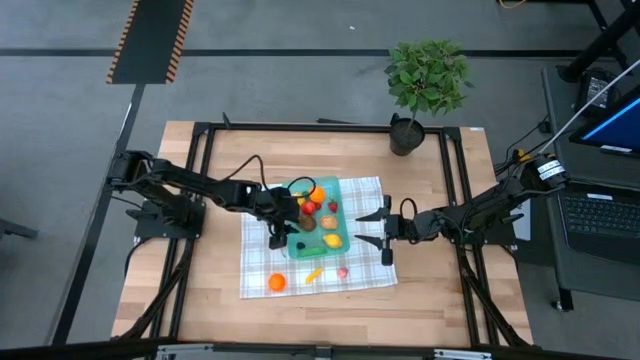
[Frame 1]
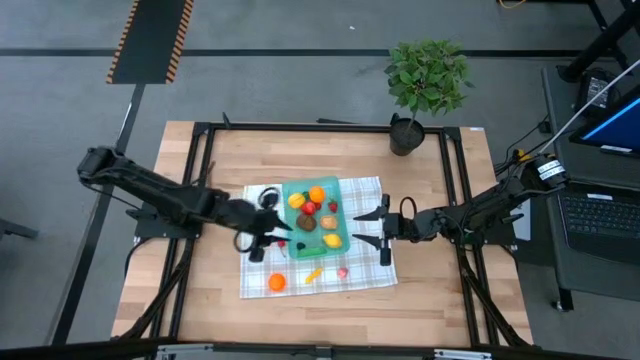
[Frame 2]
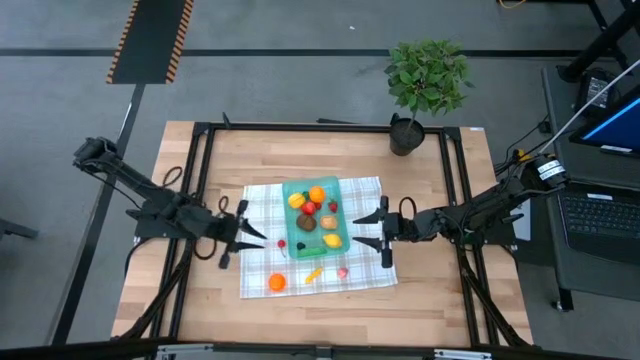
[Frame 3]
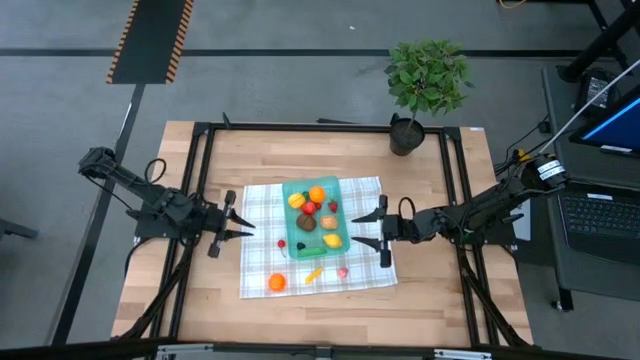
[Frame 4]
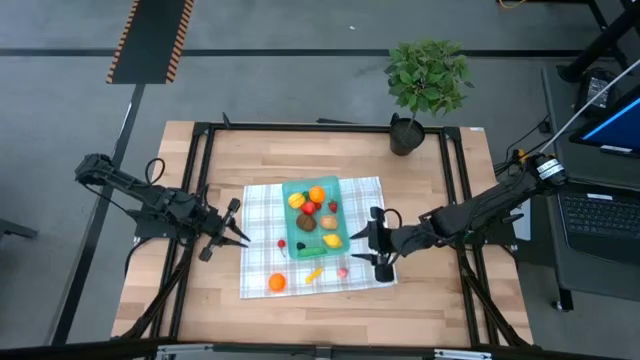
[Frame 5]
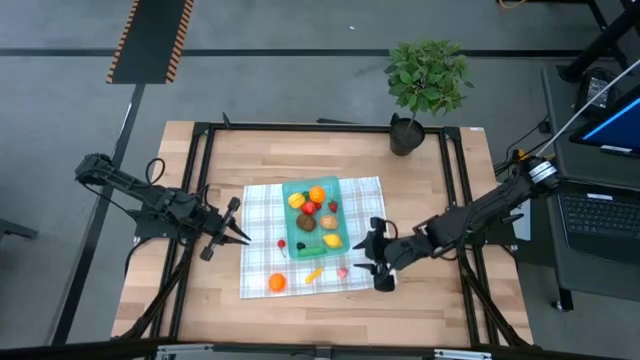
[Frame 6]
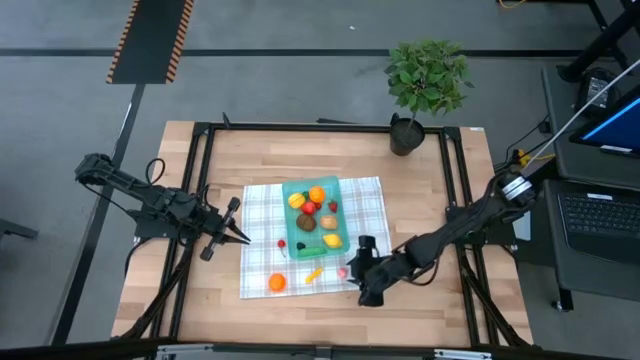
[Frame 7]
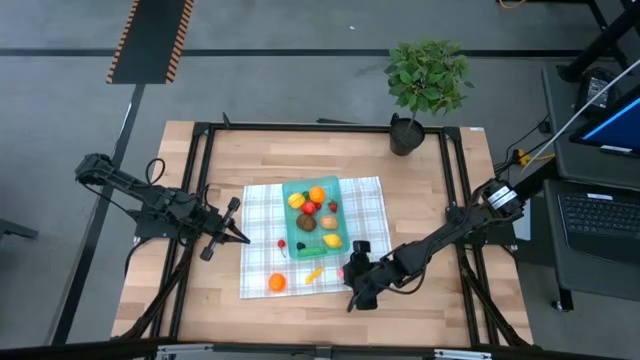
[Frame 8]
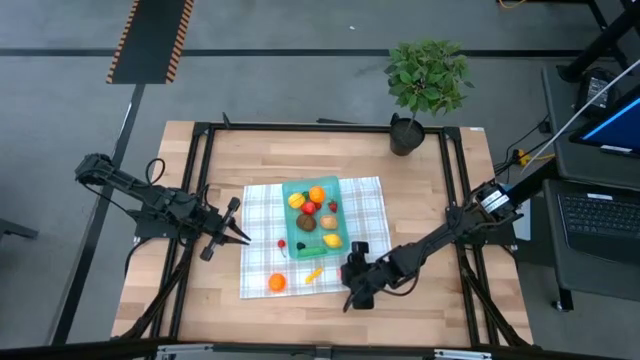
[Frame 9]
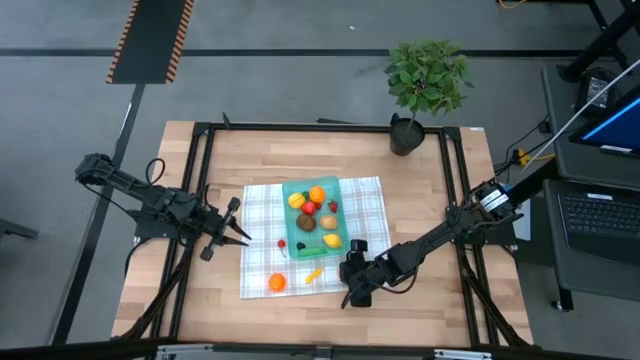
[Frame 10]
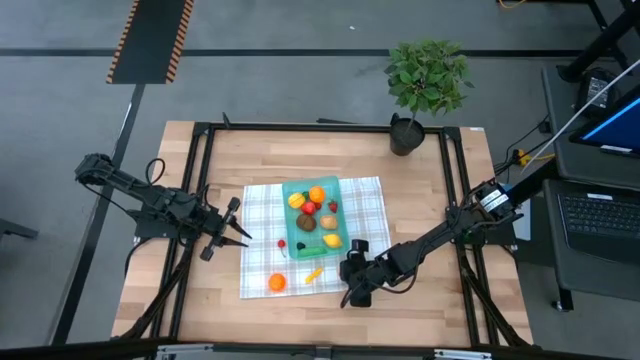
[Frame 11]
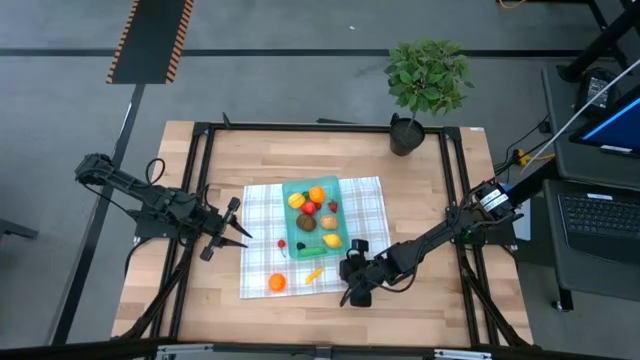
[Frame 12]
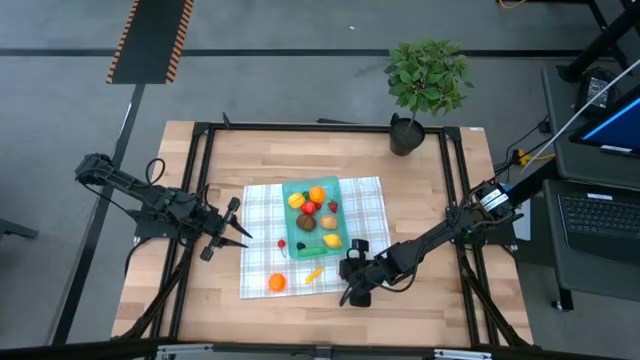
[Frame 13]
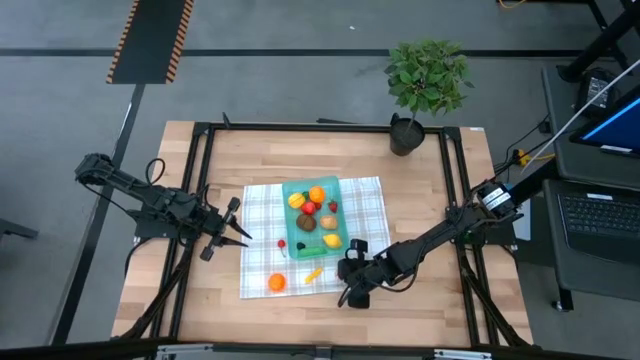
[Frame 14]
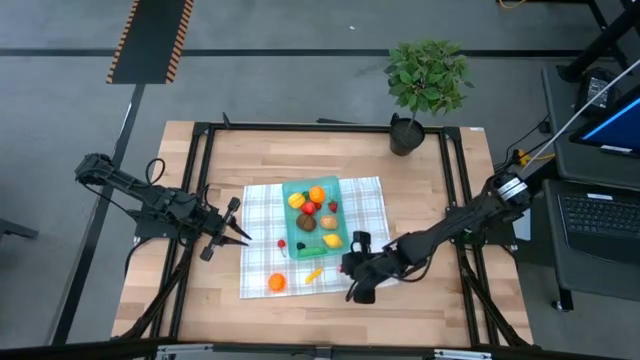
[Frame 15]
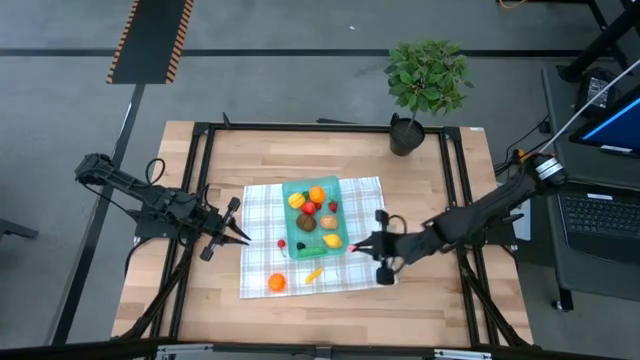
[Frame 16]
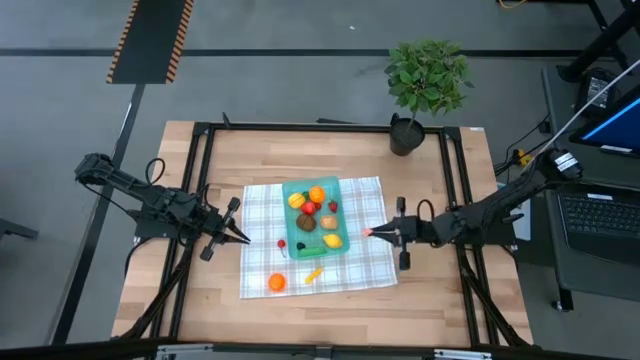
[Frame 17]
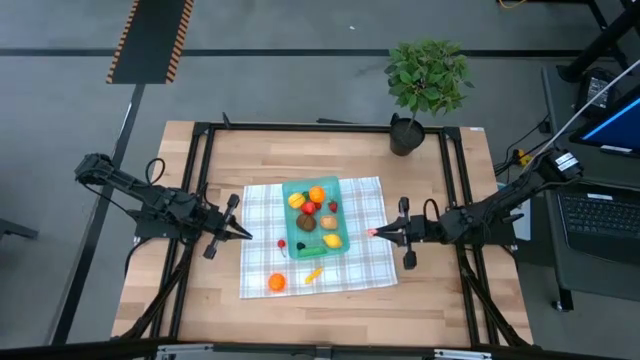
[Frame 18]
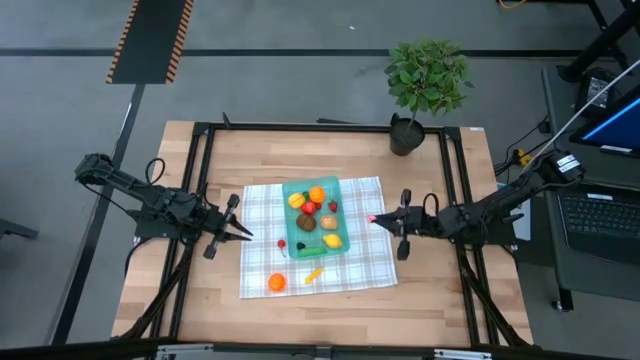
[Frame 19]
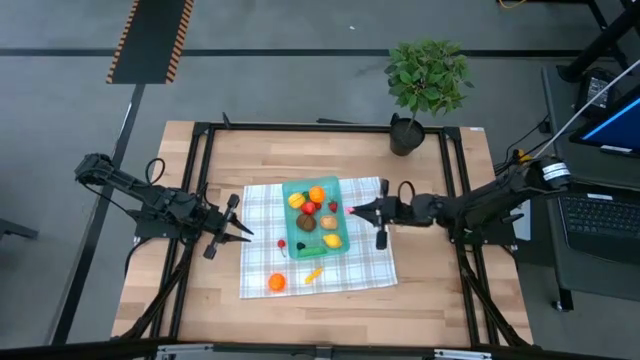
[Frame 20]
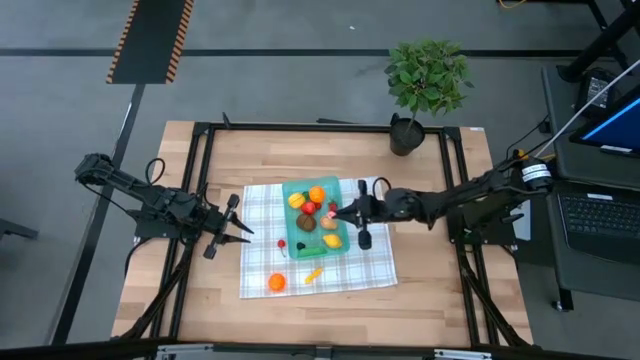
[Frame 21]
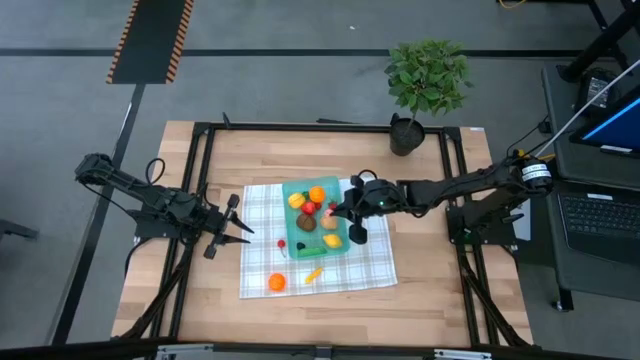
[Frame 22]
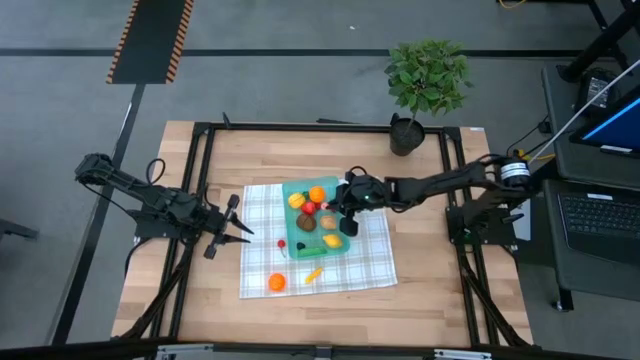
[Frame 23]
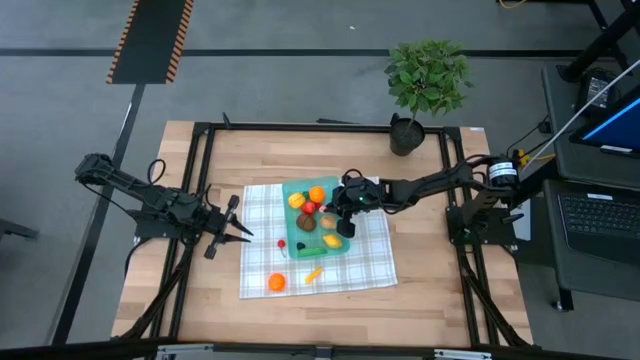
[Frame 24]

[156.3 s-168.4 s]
Task: Pick and placing Produce into tupperware
Put the peach into the blue bin

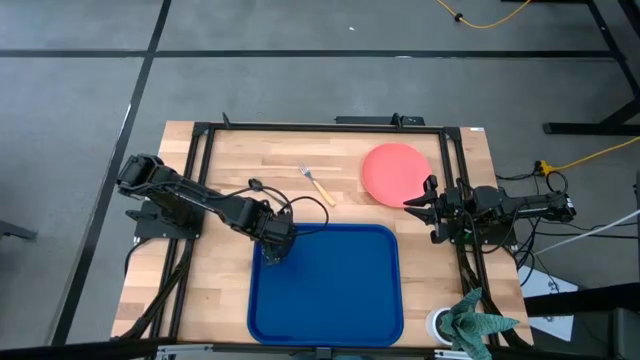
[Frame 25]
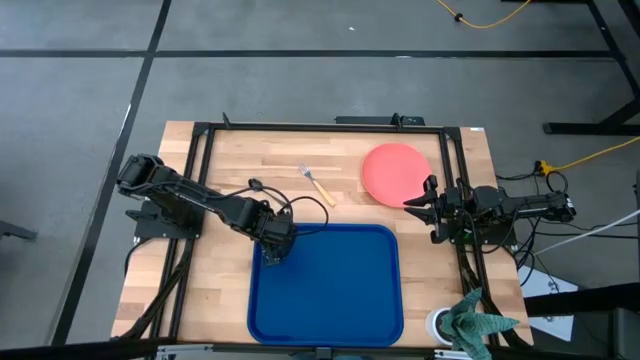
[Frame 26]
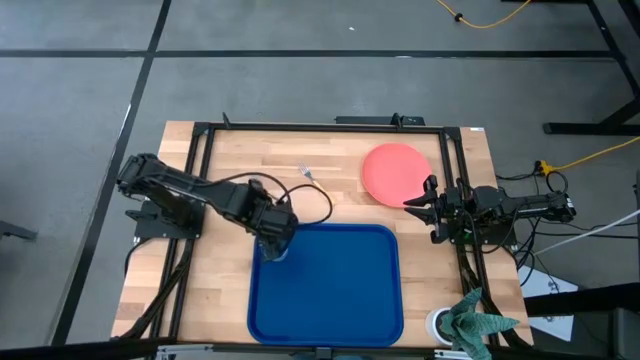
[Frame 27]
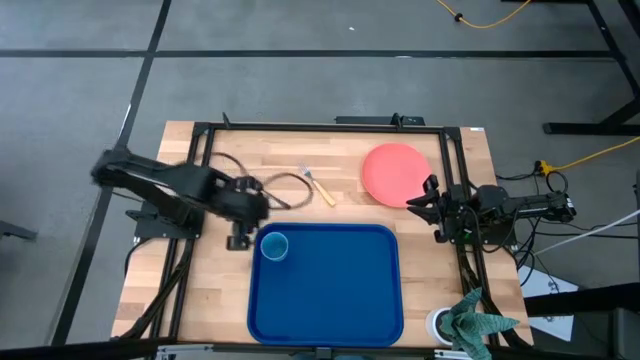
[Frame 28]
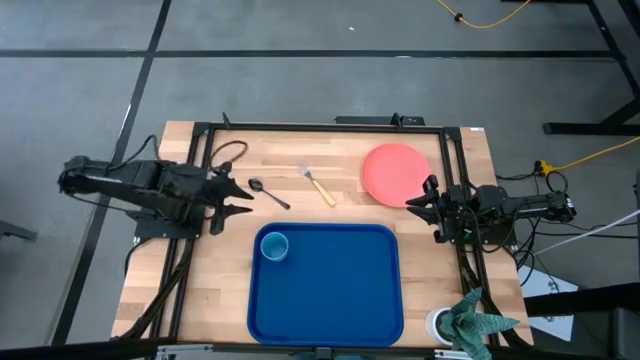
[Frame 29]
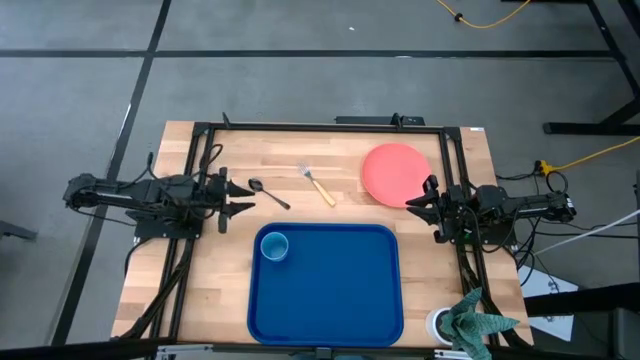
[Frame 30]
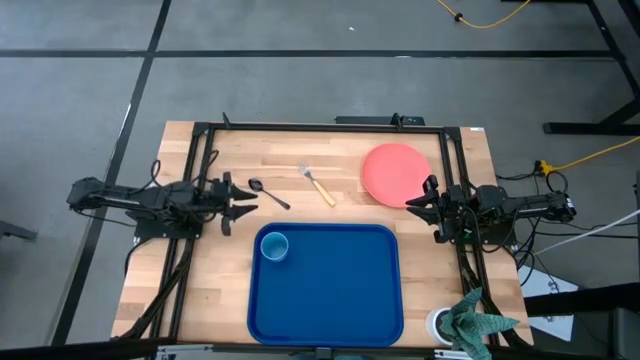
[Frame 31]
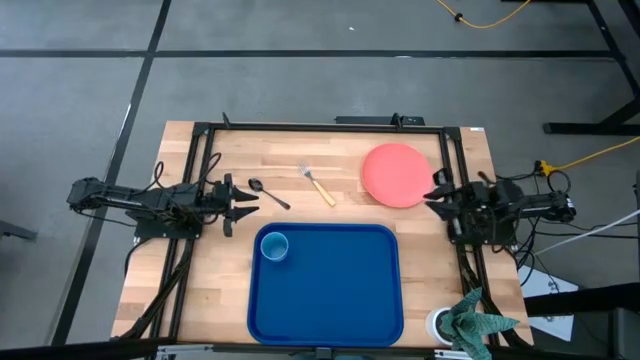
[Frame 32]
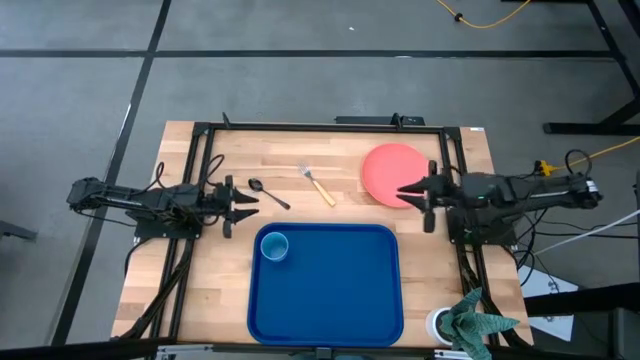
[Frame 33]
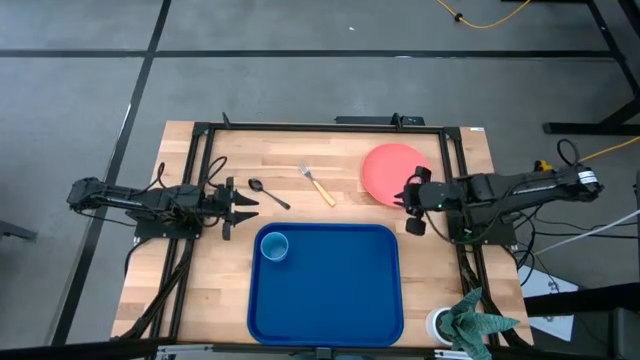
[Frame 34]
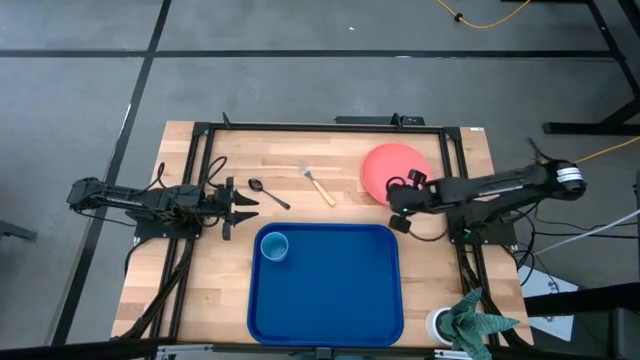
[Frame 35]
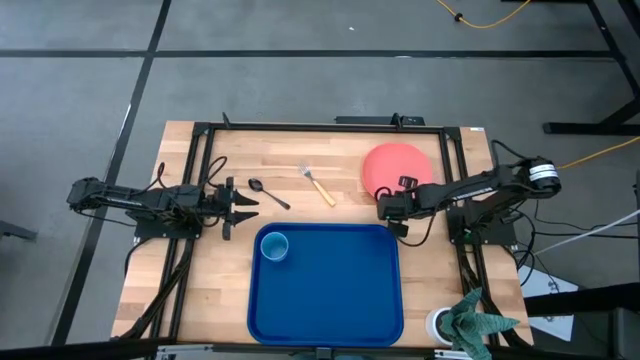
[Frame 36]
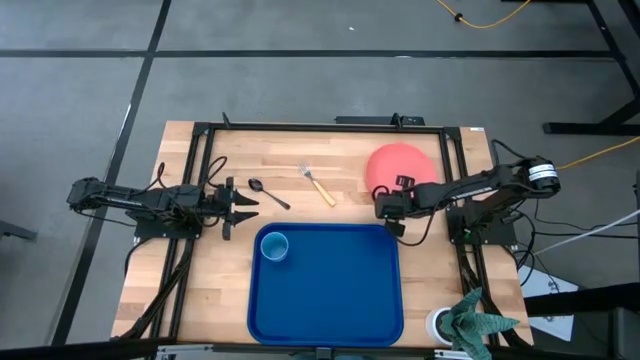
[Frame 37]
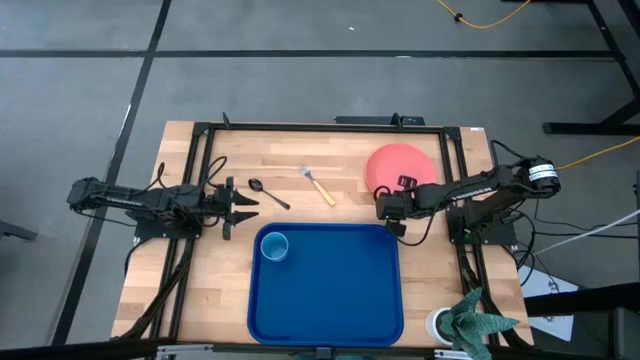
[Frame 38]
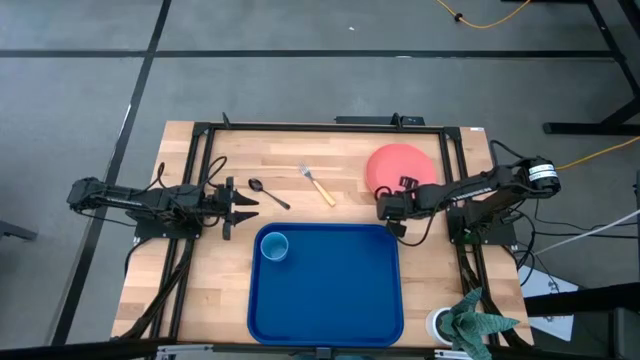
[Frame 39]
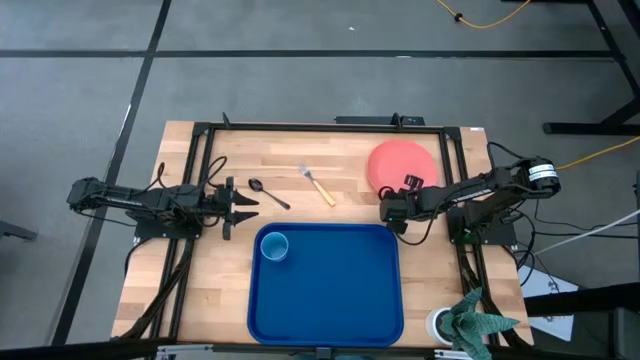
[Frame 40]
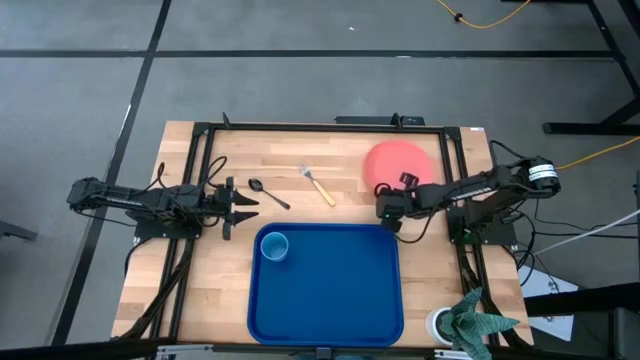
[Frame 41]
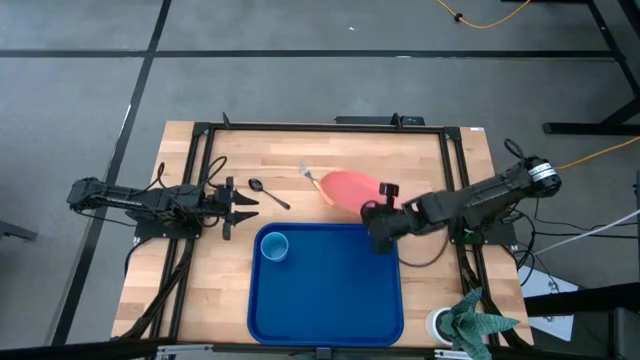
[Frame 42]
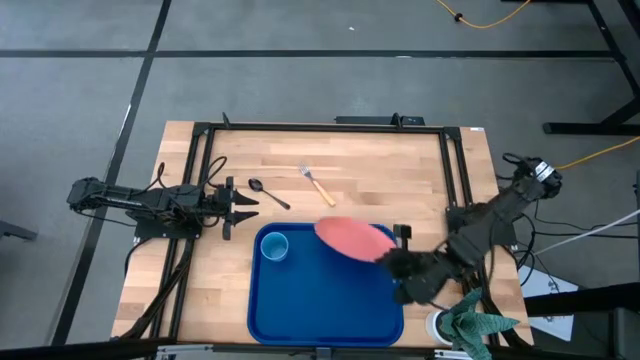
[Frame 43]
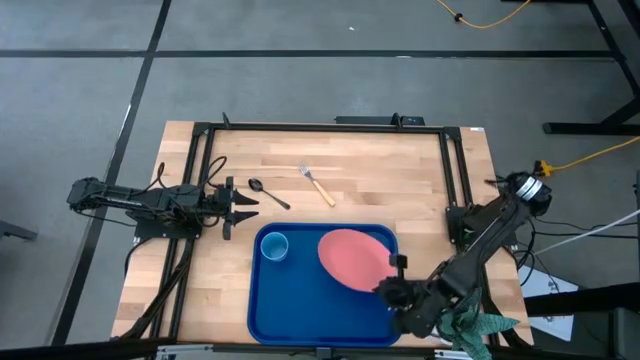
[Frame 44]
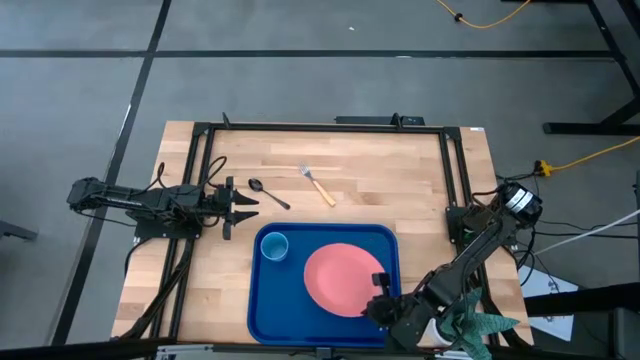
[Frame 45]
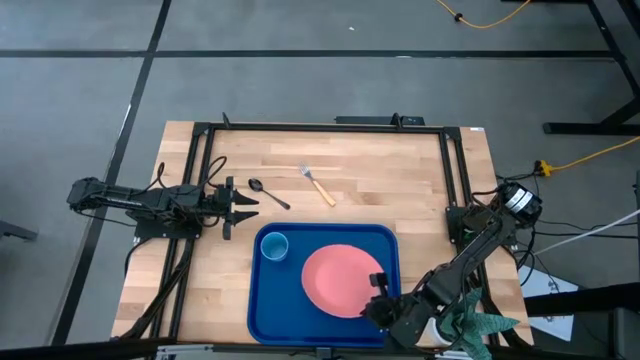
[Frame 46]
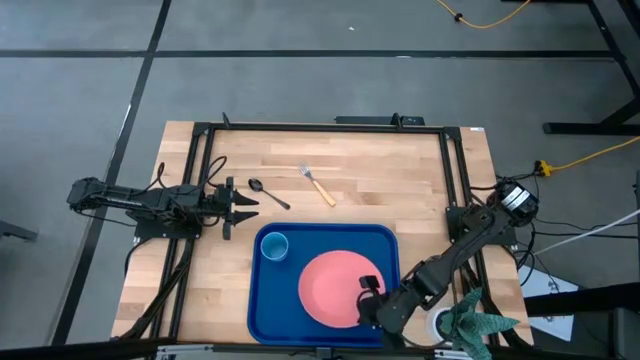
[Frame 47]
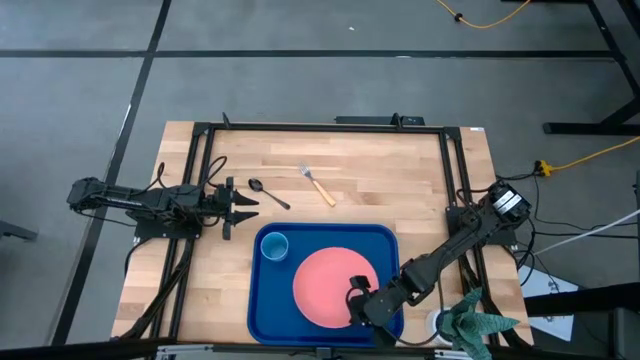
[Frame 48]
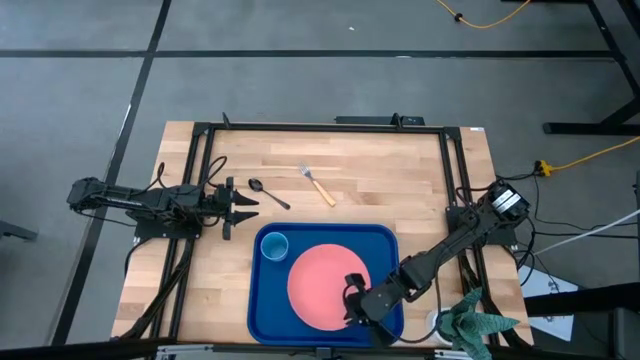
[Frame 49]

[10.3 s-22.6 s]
Task: Pick and place plate/cup/fork/spoon on tray
Put the pink plate on the blue tray
